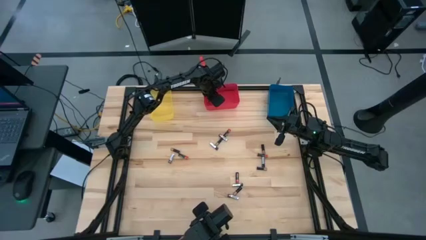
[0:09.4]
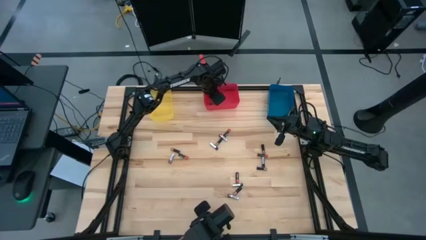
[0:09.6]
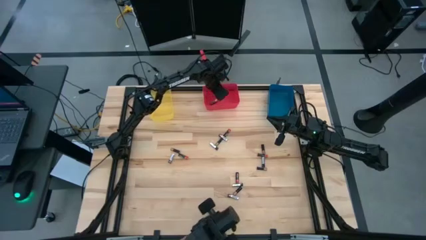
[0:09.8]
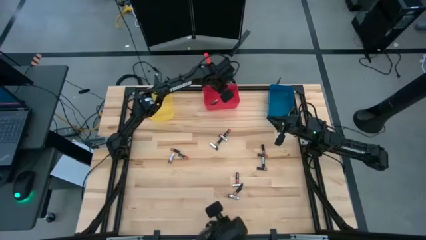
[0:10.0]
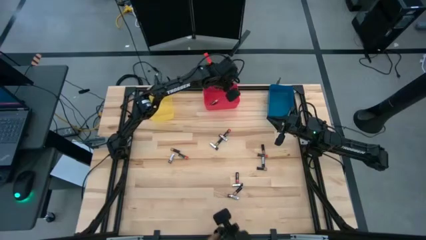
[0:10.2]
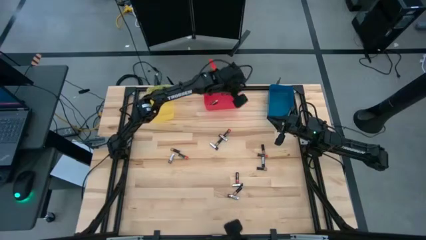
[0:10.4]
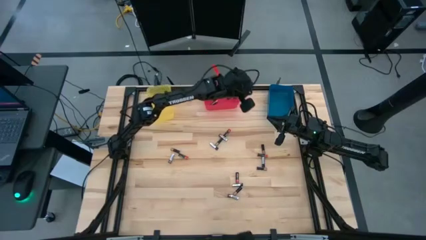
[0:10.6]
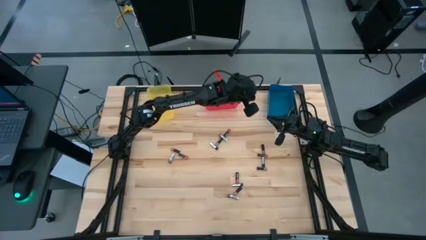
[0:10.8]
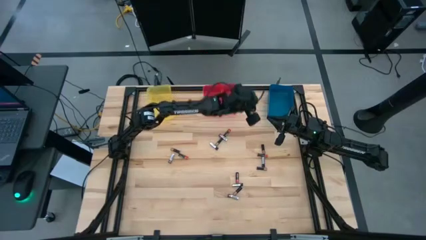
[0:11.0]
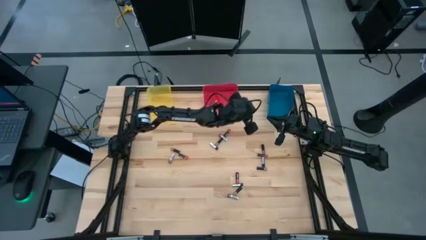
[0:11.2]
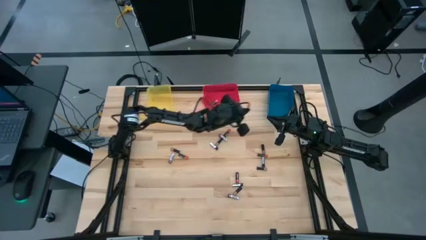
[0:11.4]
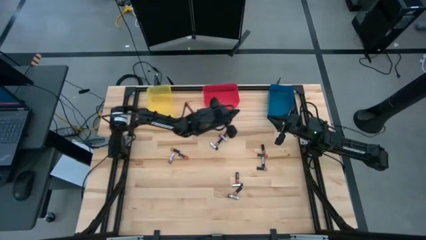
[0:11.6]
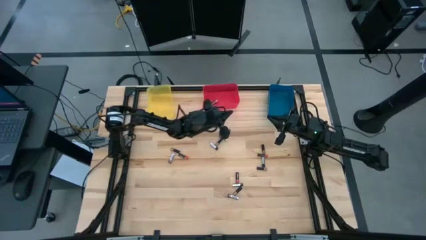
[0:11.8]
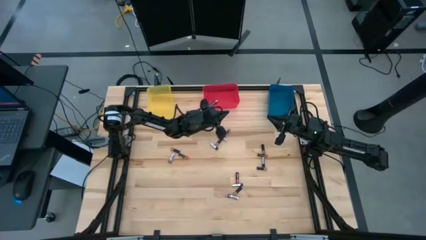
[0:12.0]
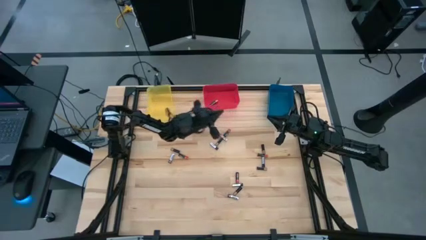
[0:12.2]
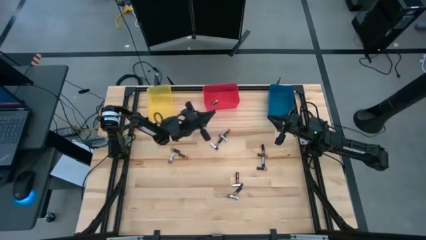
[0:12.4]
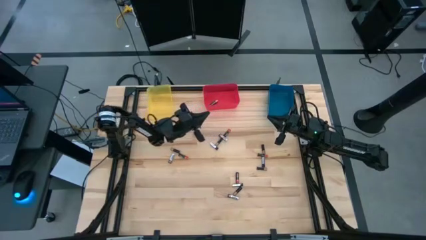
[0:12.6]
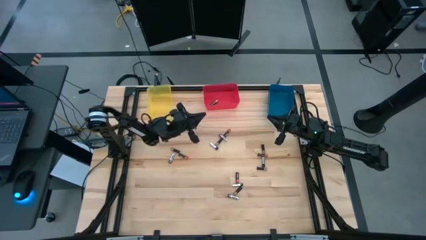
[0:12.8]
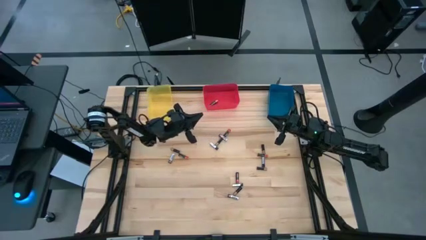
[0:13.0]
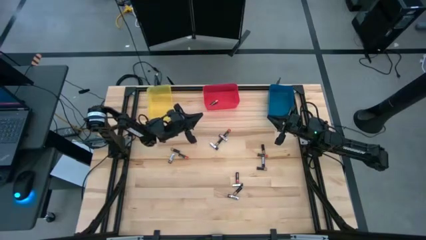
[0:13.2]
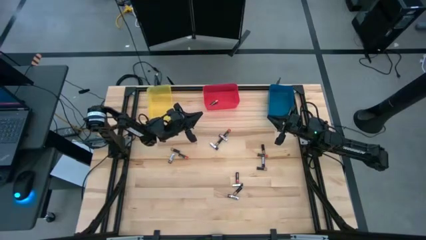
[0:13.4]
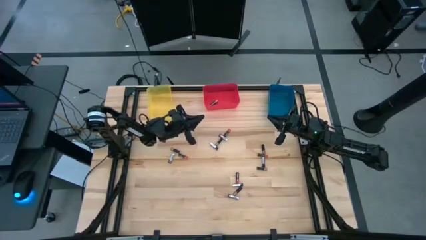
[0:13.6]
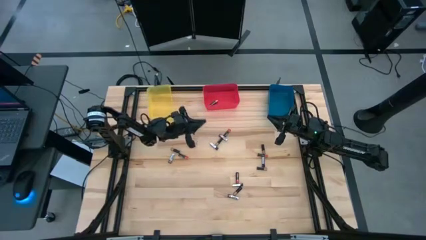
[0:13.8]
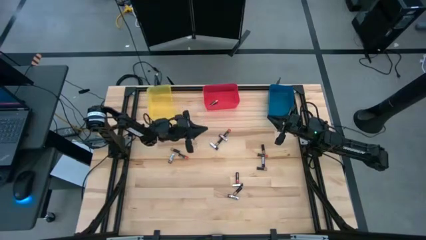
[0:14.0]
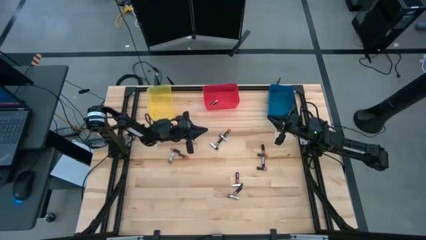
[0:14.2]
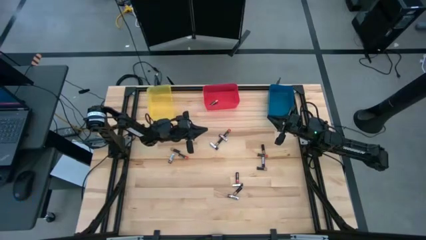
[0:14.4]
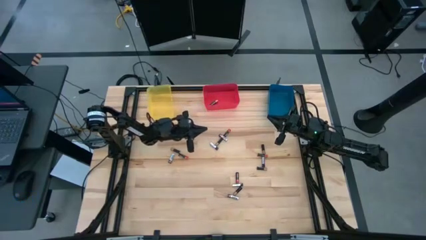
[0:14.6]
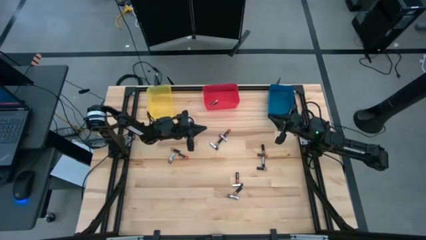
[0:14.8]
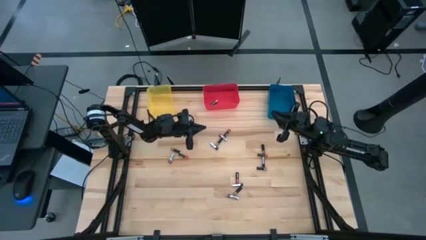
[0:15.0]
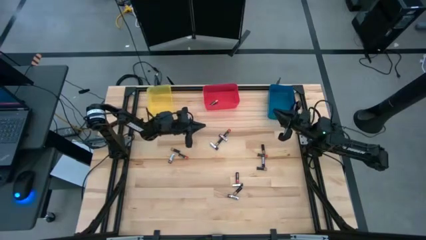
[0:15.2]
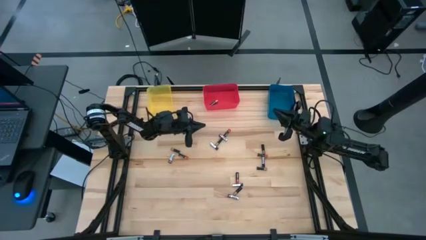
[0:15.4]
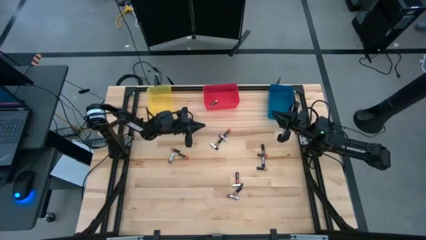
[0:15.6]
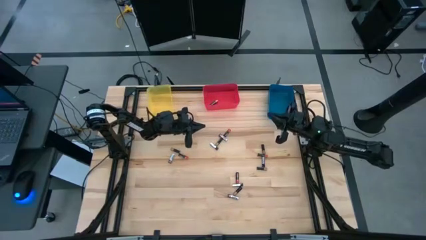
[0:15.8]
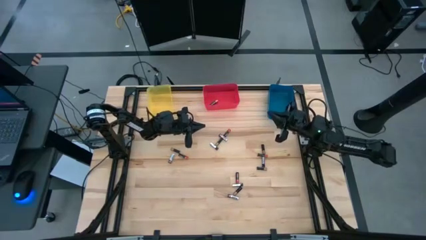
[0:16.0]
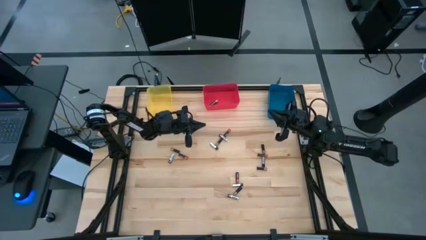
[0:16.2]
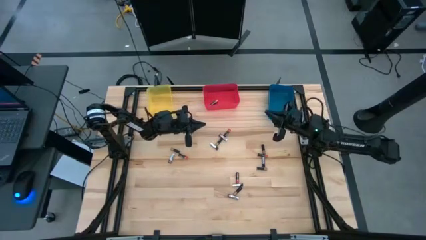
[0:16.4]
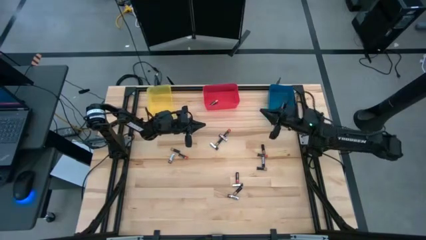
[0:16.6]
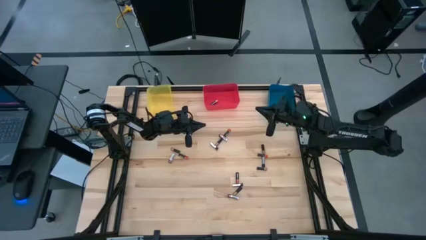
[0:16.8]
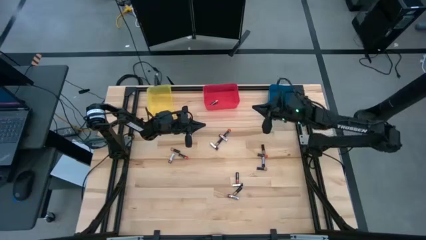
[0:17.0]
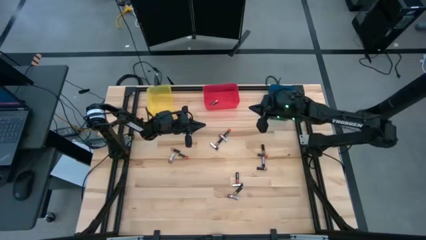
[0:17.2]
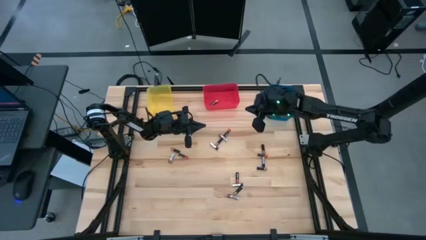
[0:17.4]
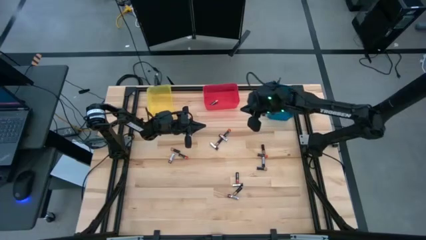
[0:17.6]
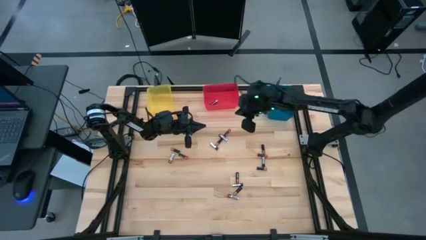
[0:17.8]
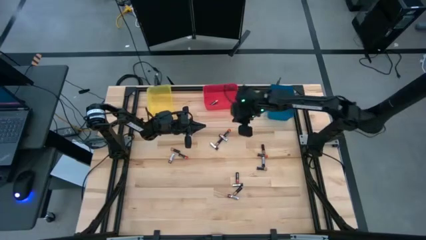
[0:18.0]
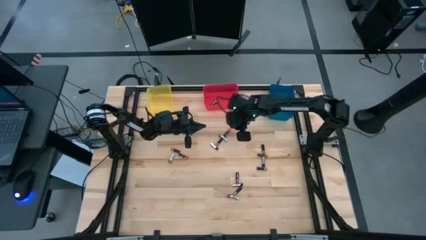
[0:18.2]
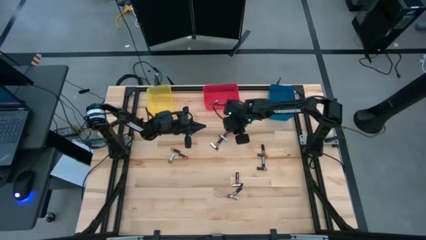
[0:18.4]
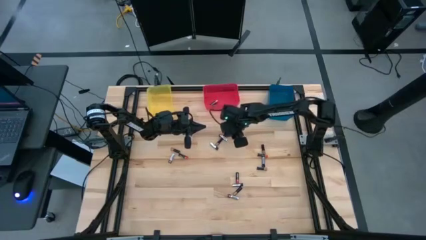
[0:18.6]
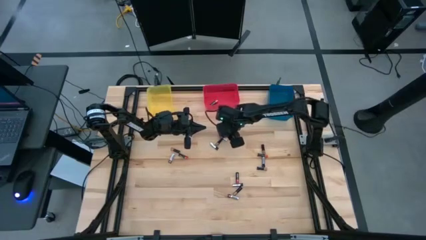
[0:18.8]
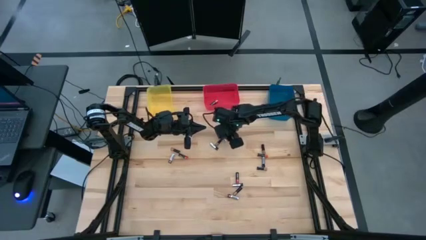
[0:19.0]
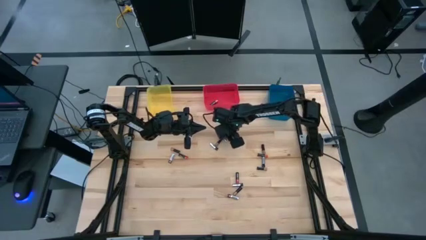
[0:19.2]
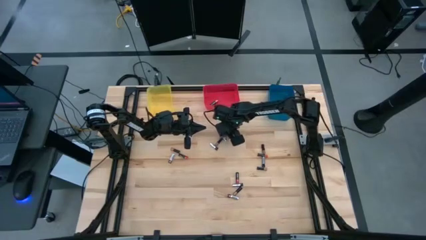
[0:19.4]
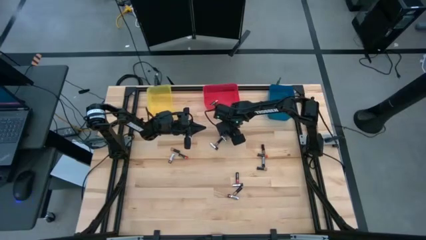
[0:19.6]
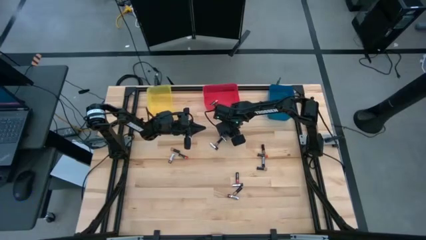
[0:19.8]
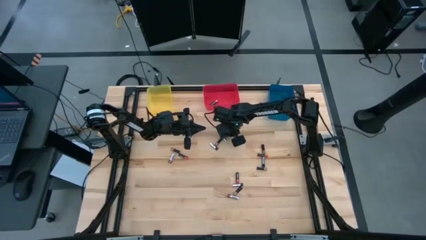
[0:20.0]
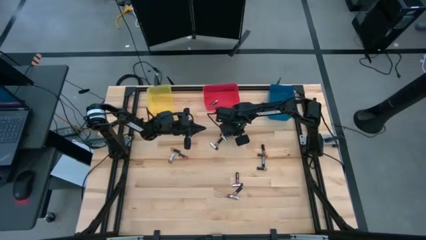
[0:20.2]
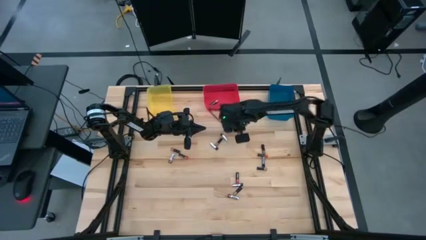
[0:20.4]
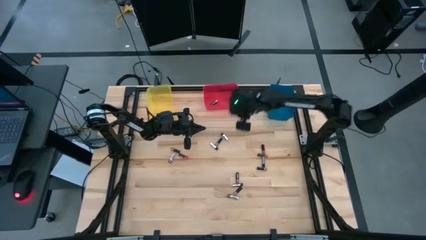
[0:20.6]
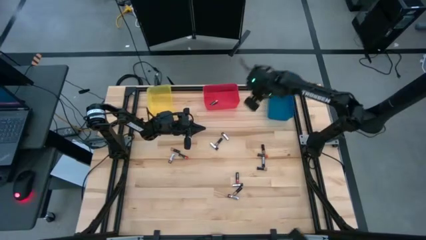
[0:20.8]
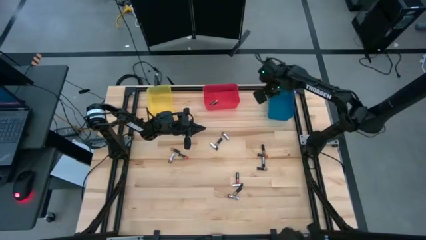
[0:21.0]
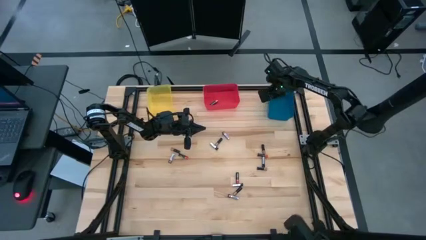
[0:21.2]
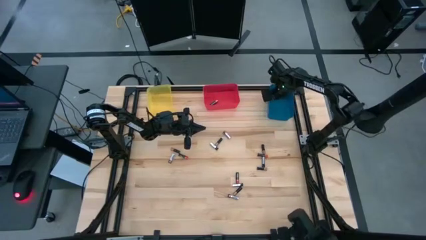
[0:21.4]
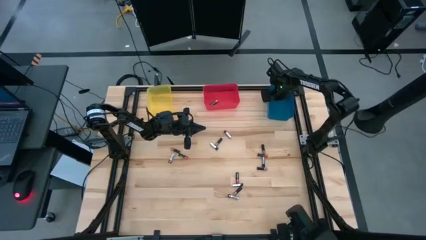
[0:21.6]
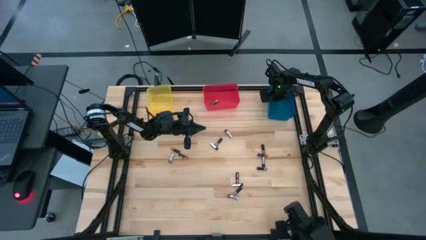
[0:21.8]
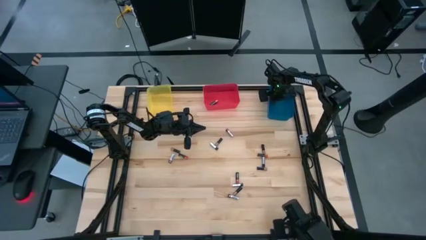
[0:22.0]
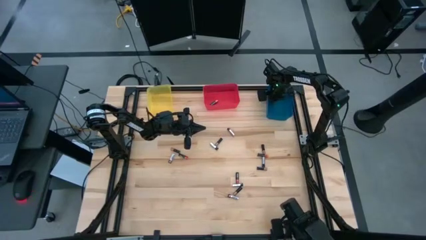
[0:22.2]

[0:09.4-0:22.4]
Task: Sort batteries
Put the red battery into the blue bin

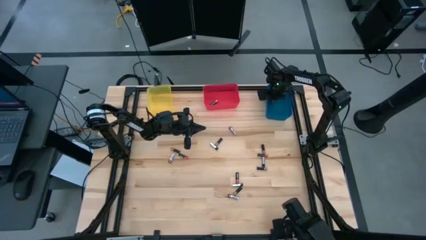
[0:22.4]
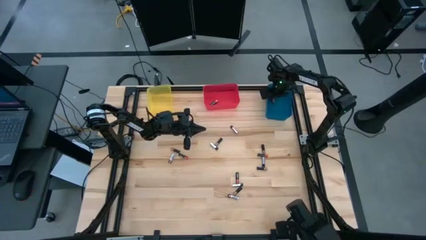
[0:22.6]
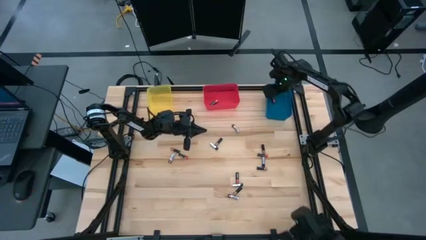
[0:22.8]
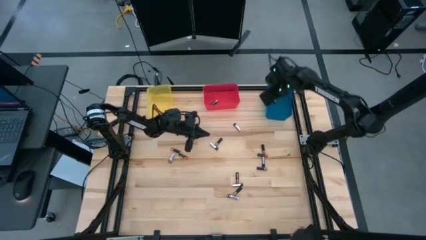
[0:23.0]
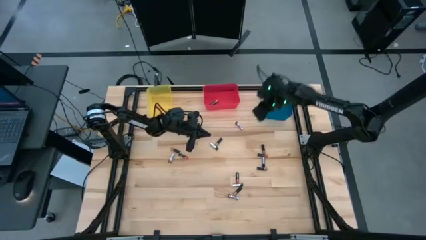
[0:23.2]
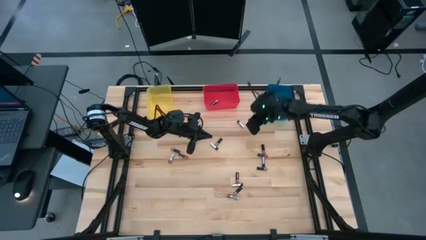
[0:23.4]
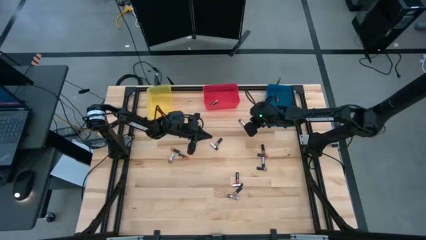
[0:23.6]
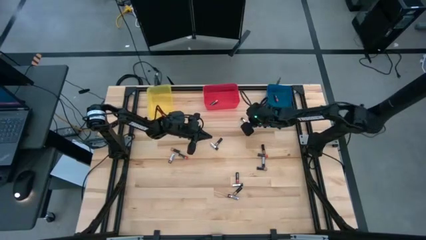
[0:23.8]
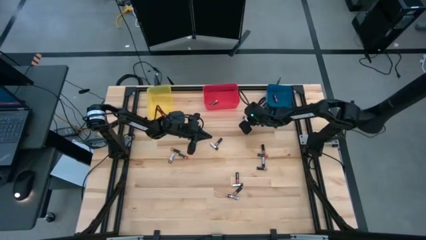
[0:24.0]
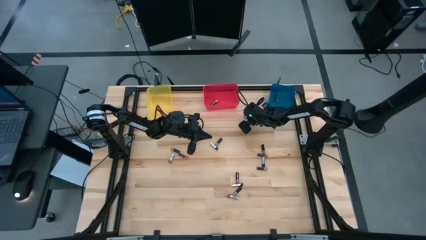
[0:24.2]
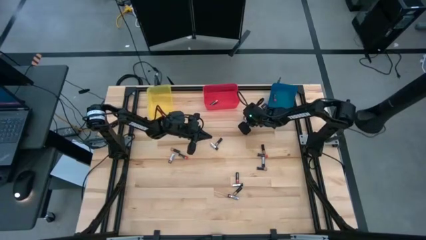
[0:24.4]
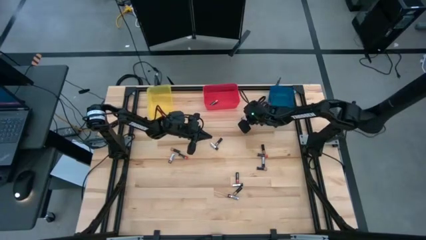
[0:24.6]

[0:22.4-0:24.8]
Adjust the silver battery
